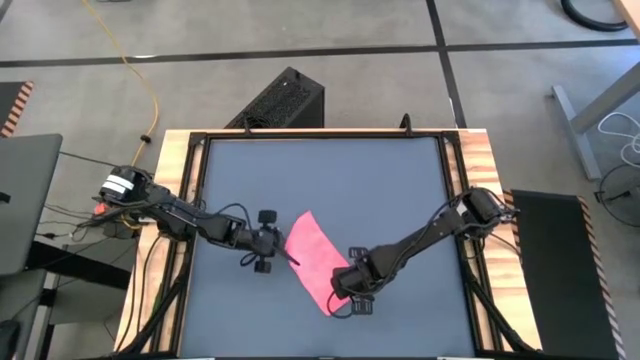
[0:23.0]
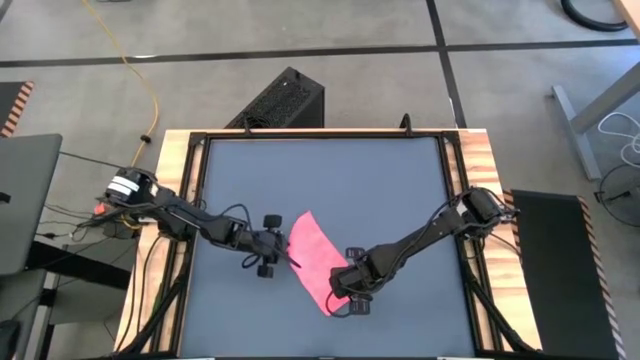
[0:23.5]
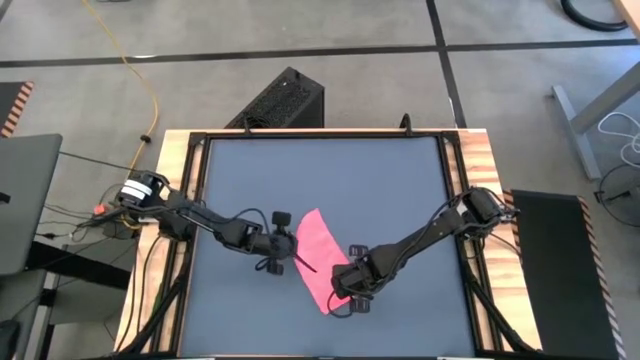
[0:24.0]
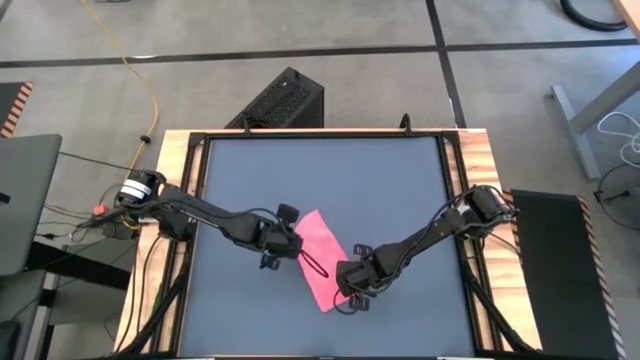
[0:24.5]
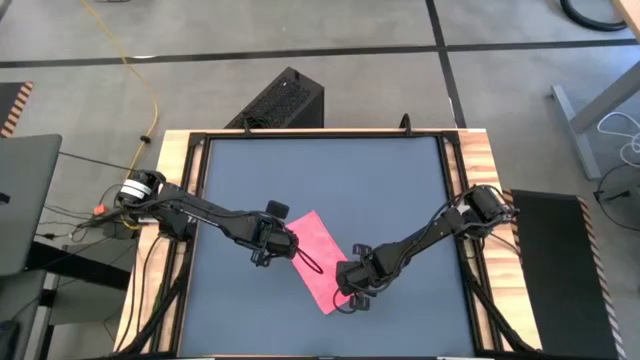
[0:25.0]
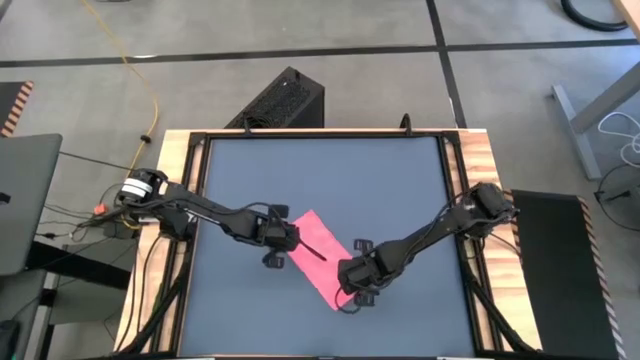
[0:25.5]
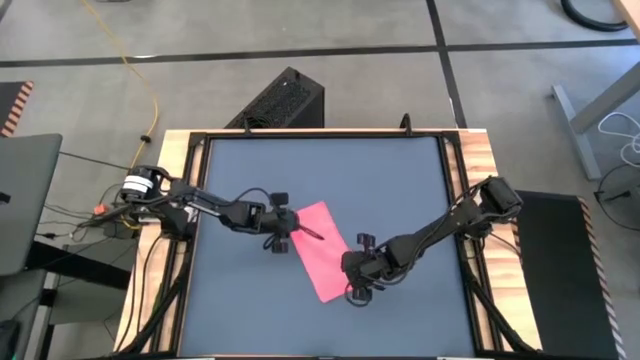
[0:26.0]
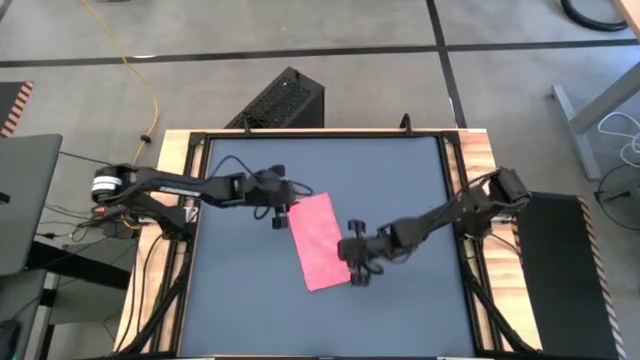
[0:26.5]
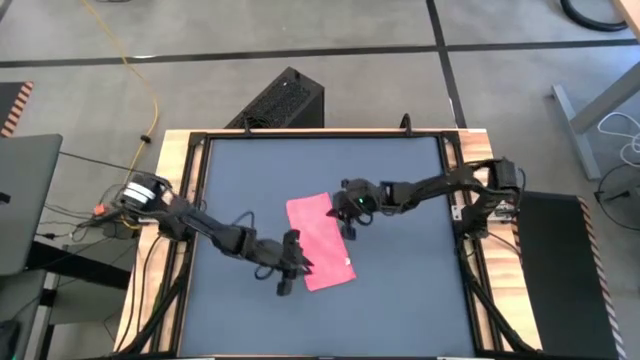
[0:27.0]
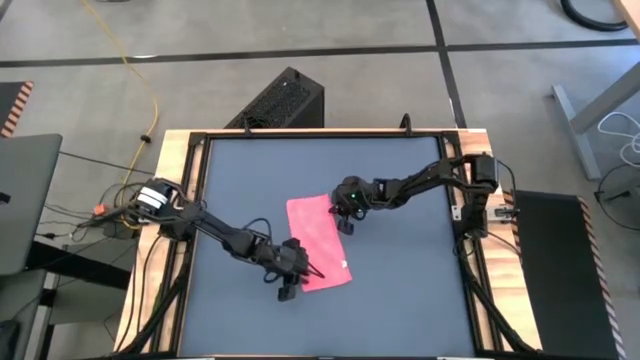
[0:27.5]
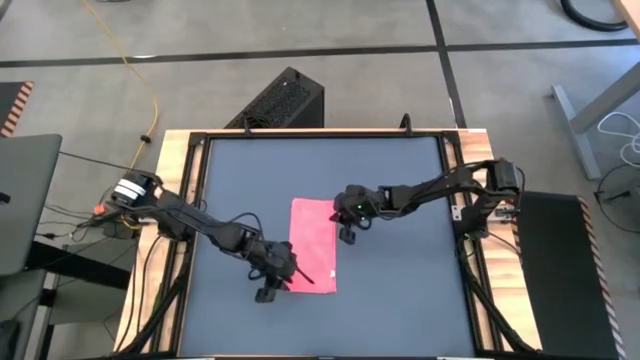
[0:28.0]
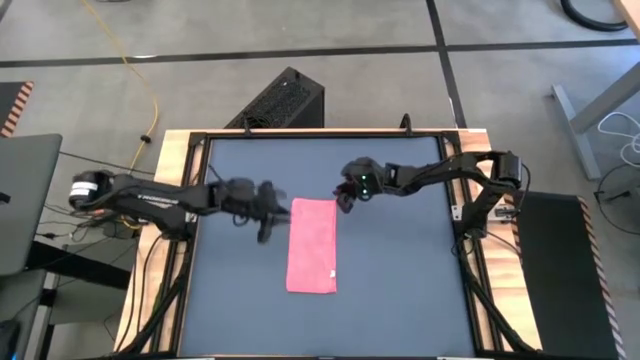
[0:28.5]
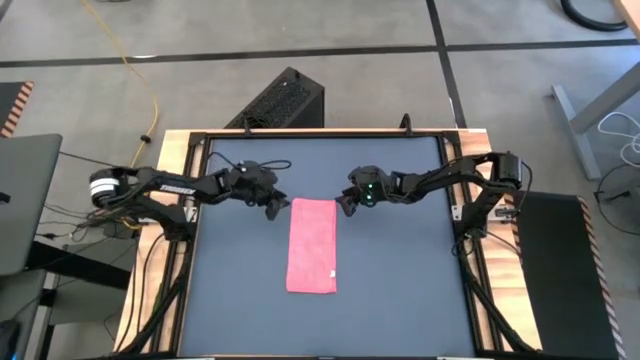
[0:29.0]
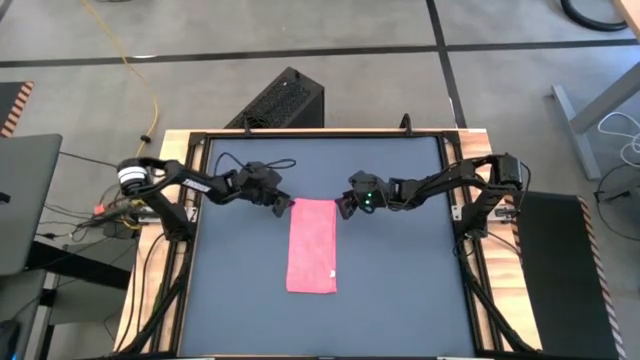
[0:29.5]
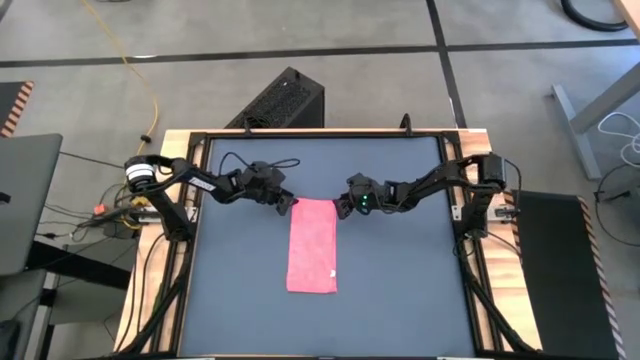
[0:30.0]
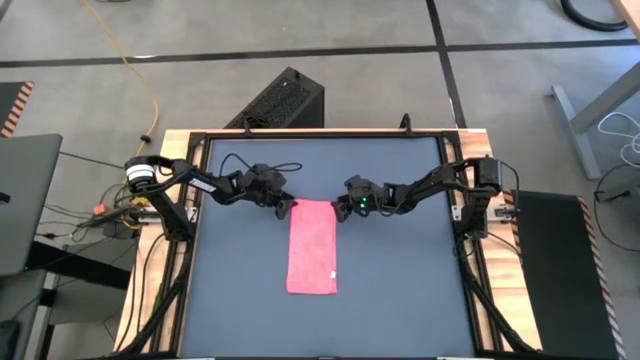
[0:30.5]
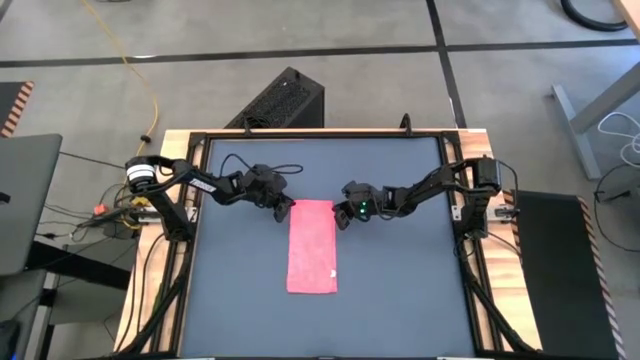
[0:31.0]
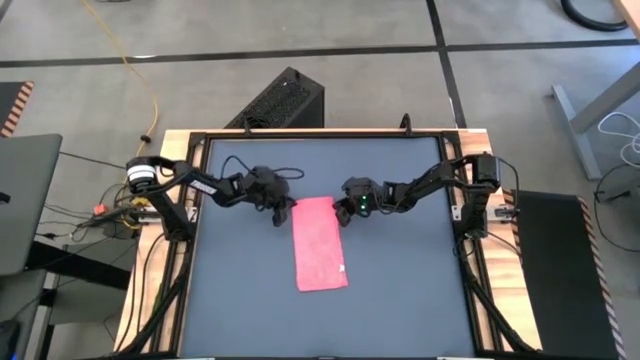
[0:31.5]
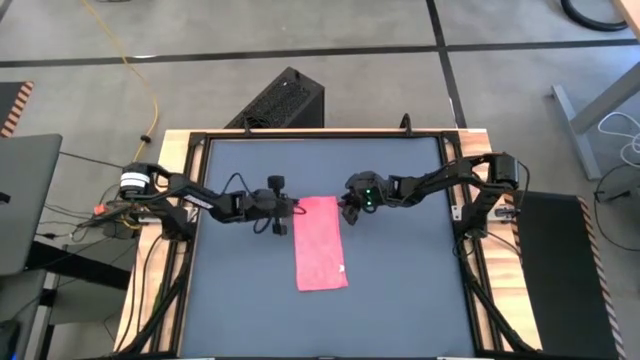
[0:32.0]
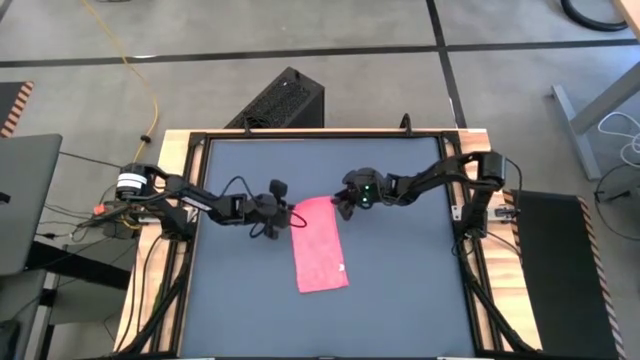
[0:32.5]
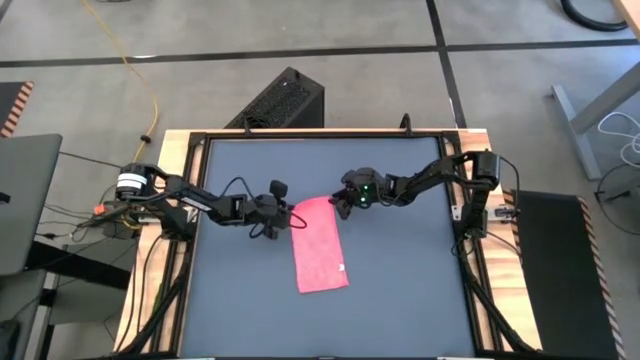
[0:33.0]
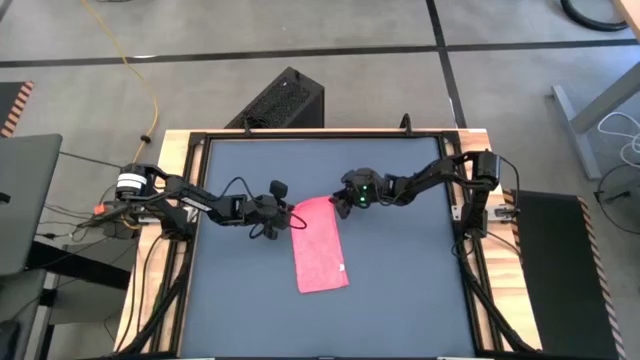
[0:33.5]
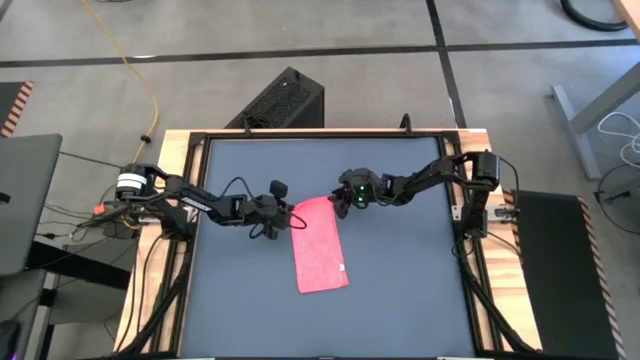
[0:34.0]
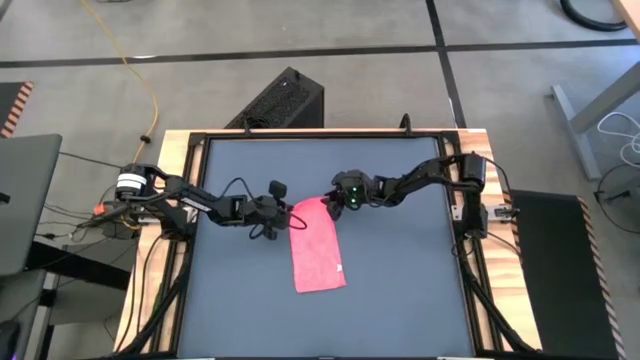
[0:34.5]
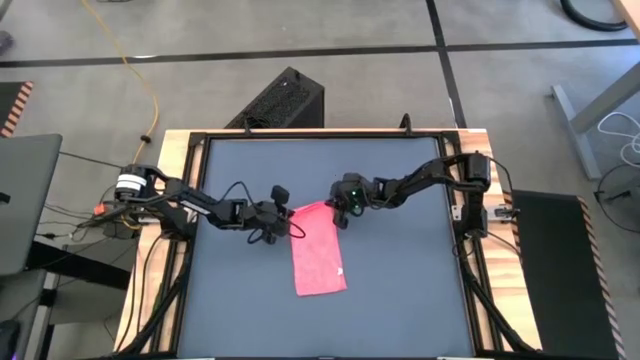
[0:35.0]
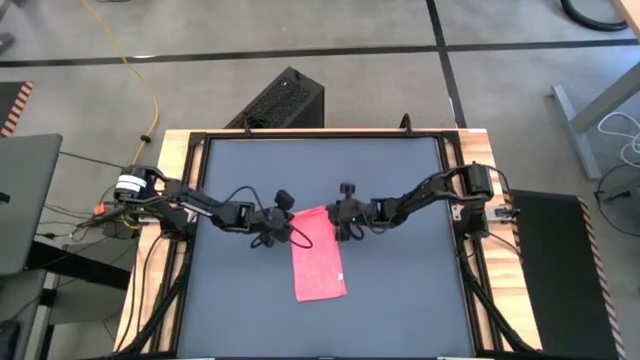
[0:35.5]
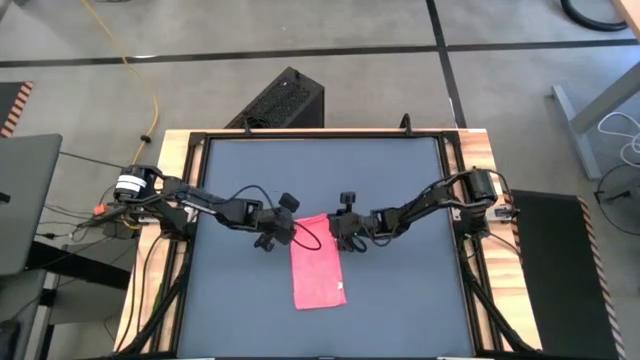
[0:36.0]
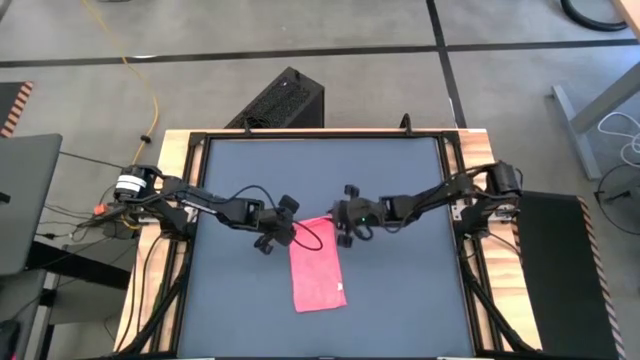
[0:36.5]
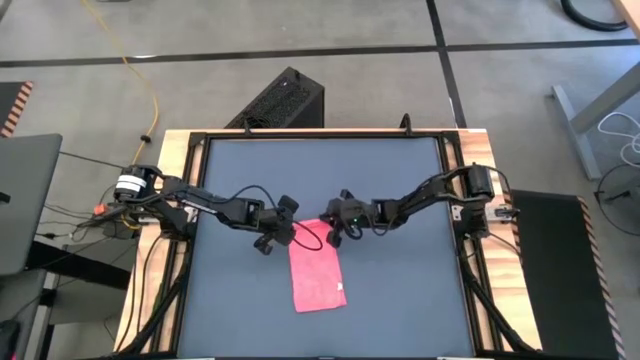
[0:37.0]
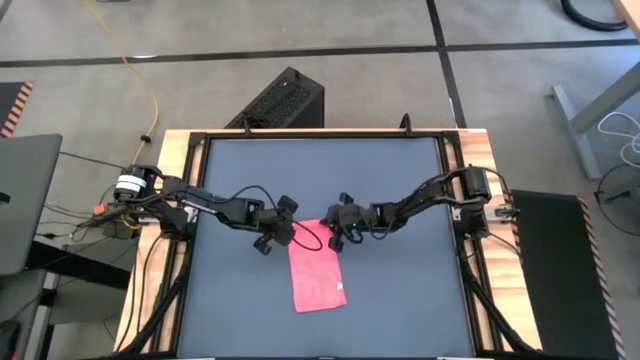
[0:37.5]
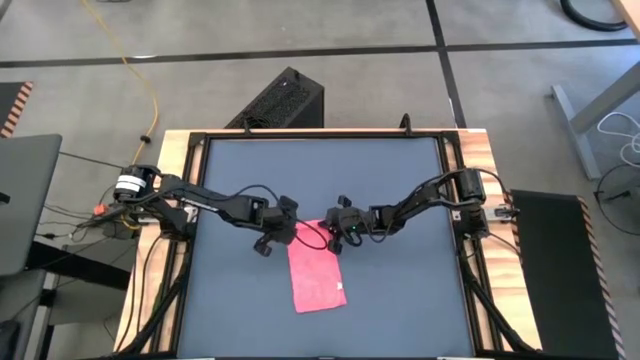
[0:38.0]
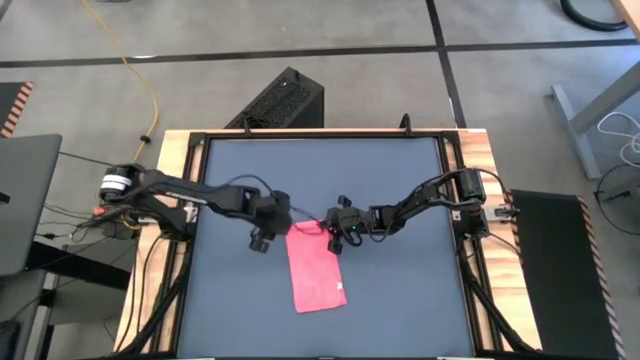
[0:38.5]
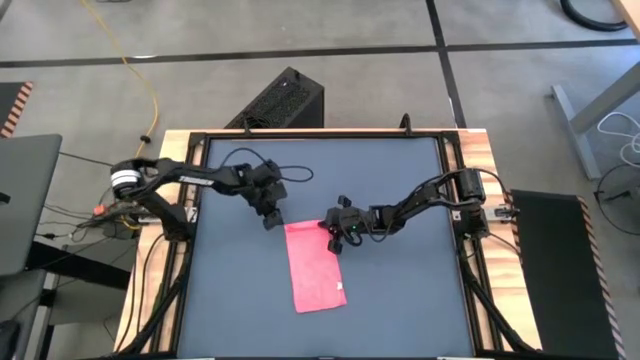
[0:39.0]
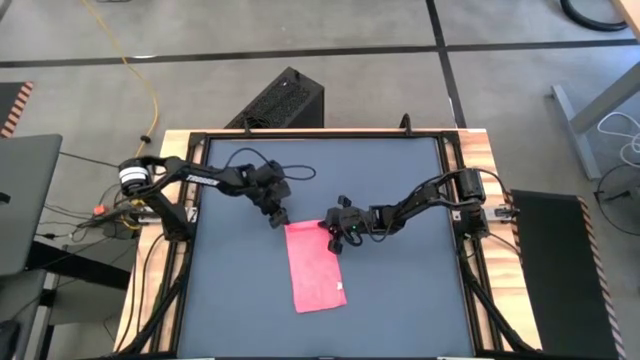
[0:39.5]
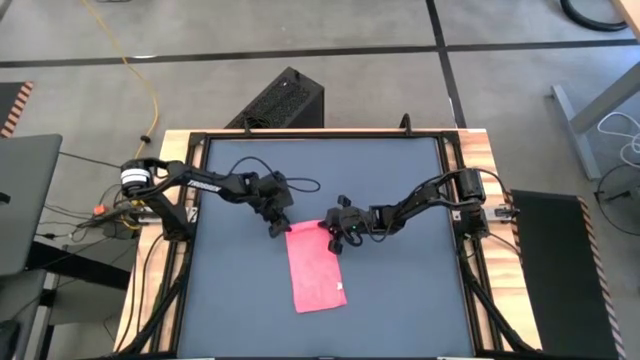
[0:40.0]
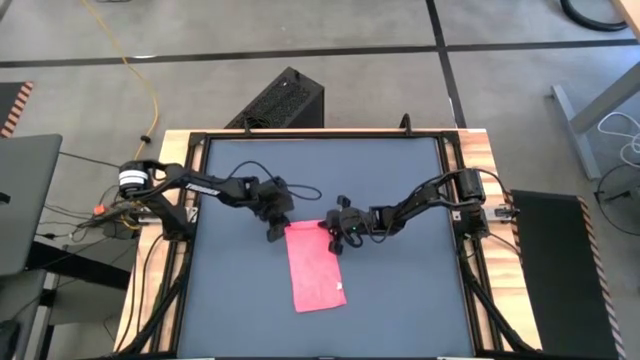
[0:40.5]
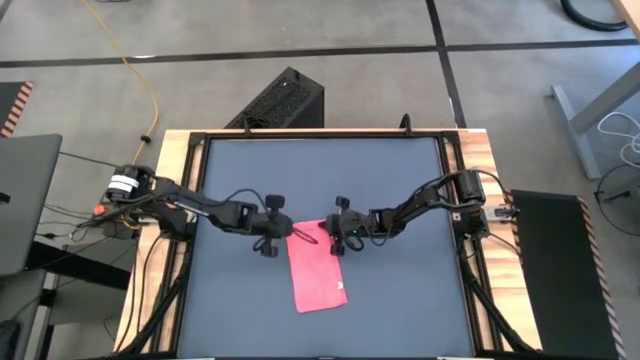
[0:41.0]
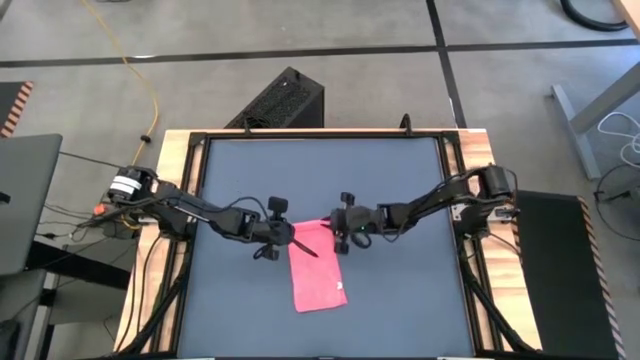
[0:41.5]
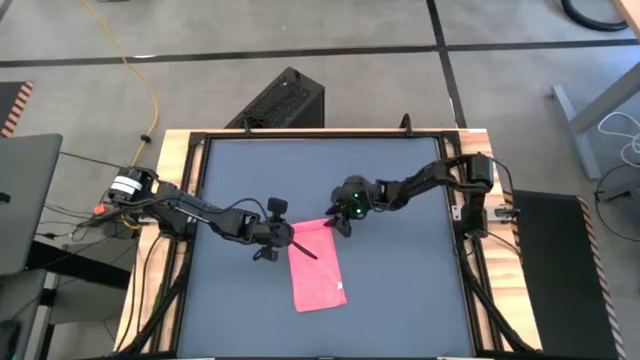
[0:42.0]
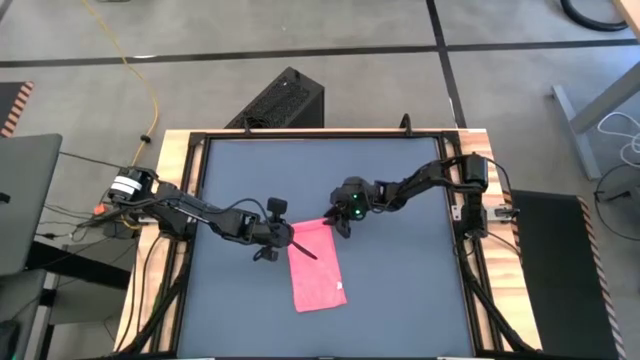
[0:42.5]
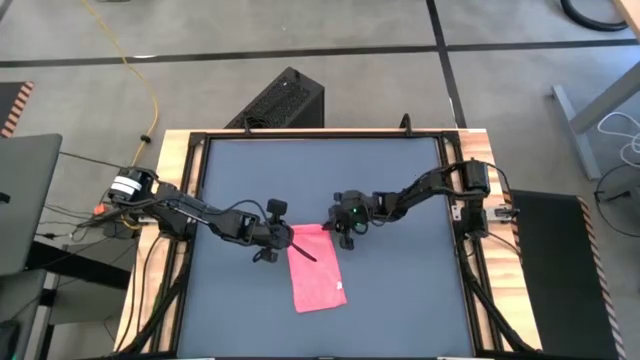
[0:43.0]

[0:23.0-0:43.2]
Task: Roll towel
Roll the light red towel
